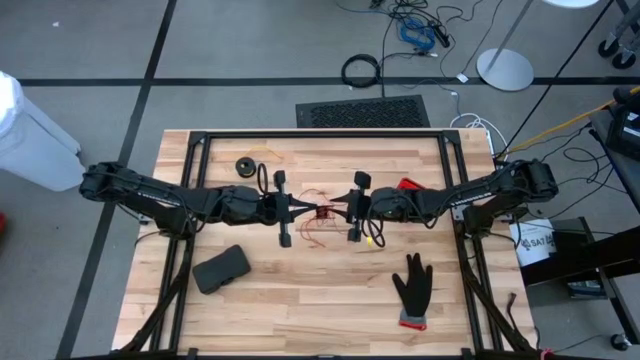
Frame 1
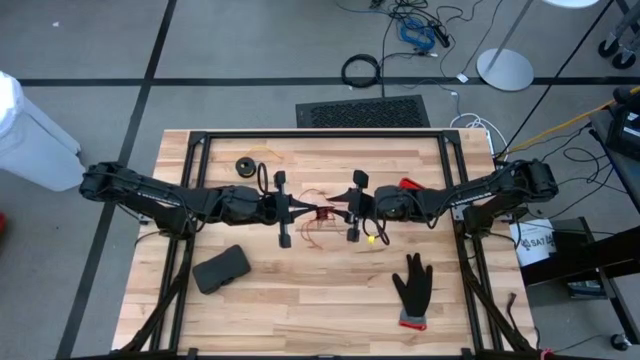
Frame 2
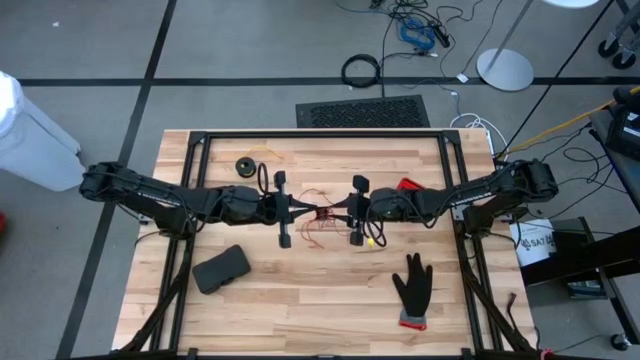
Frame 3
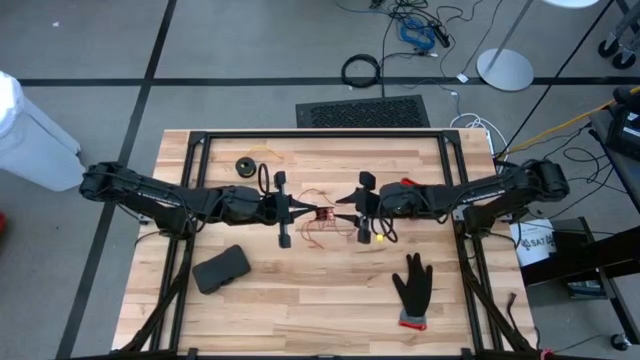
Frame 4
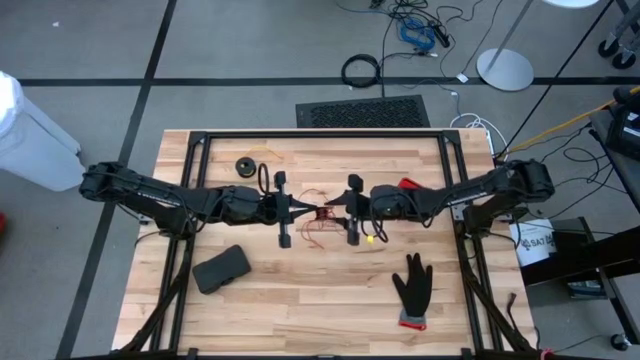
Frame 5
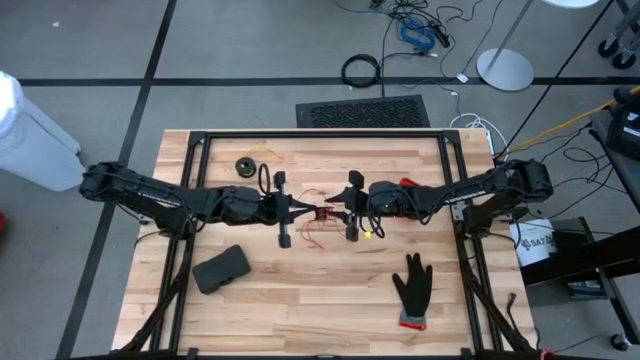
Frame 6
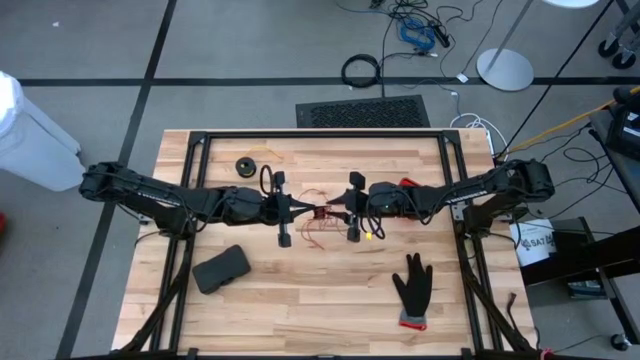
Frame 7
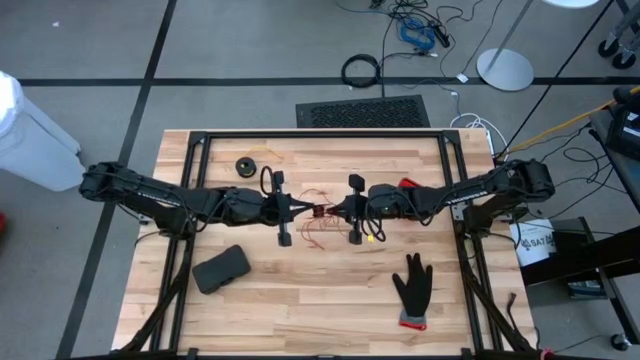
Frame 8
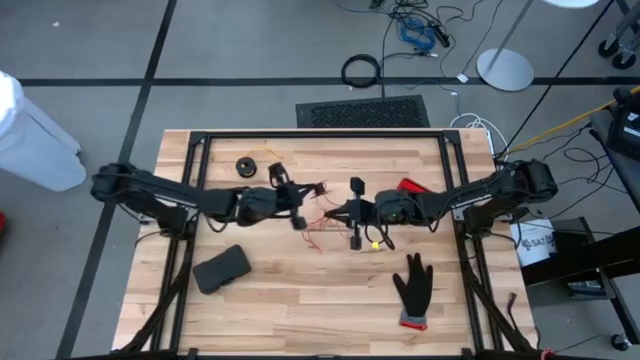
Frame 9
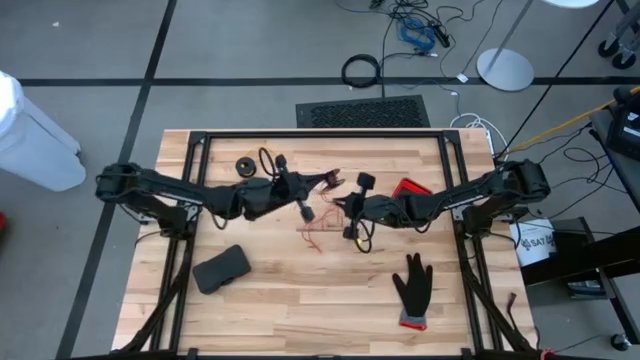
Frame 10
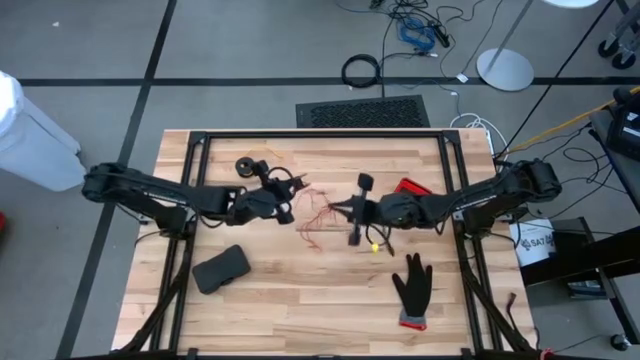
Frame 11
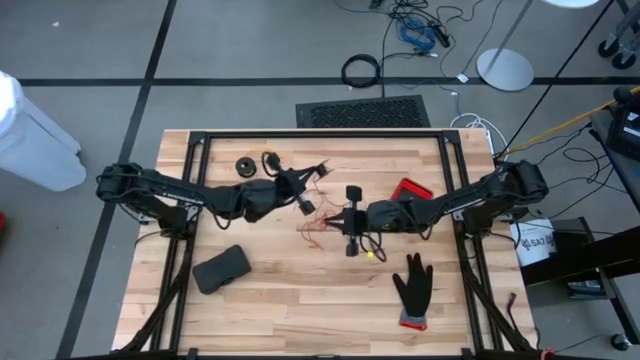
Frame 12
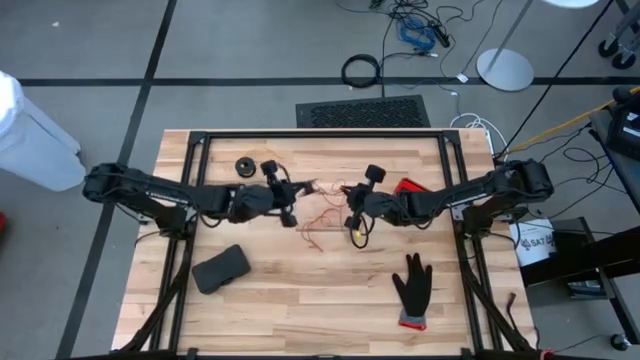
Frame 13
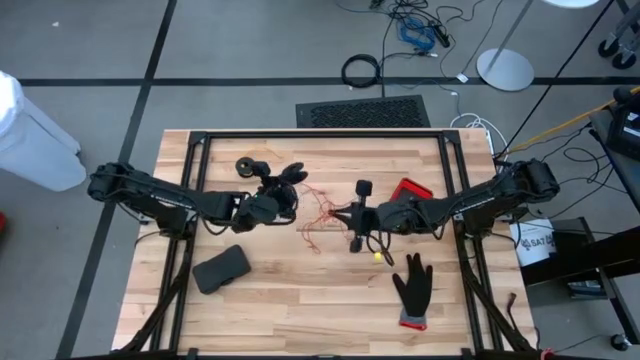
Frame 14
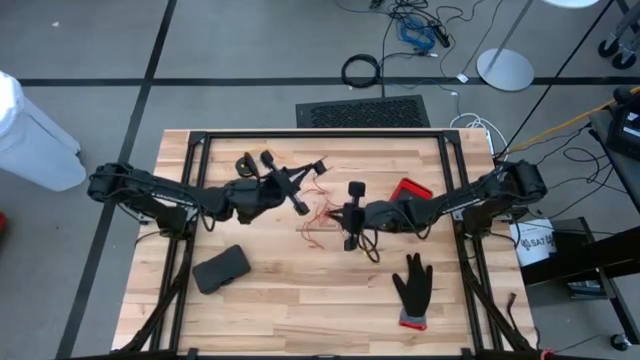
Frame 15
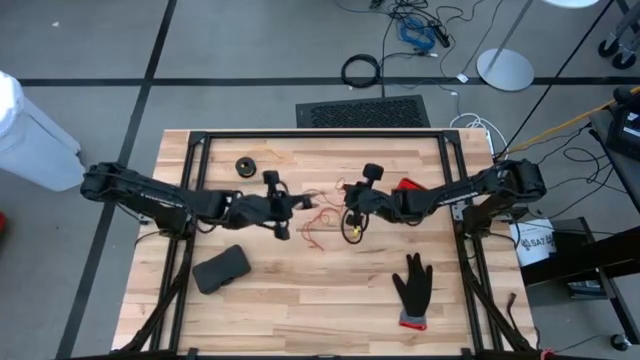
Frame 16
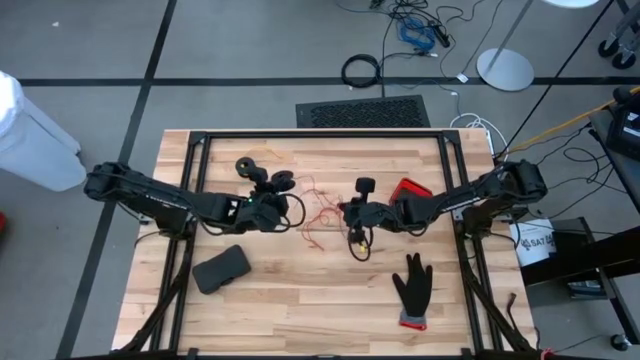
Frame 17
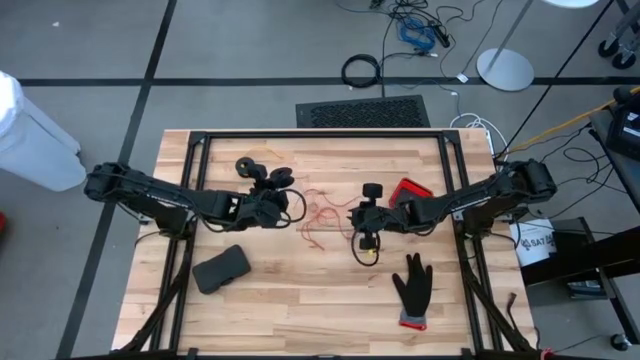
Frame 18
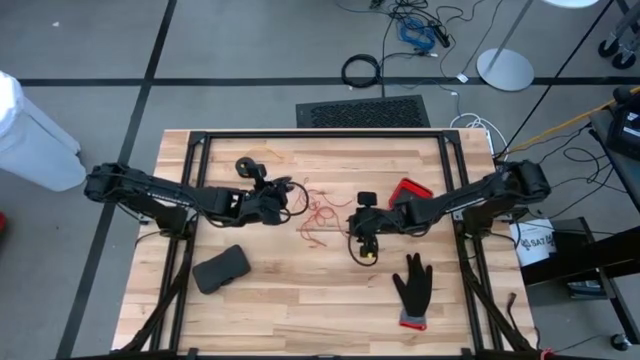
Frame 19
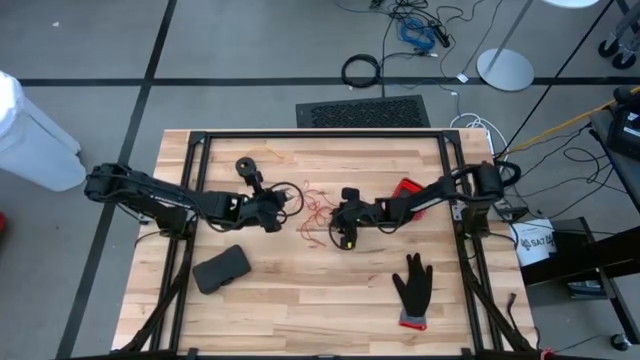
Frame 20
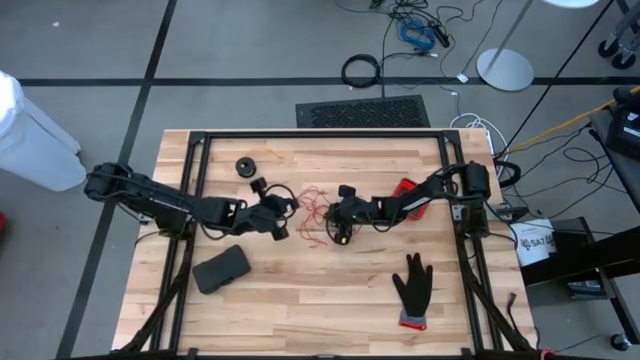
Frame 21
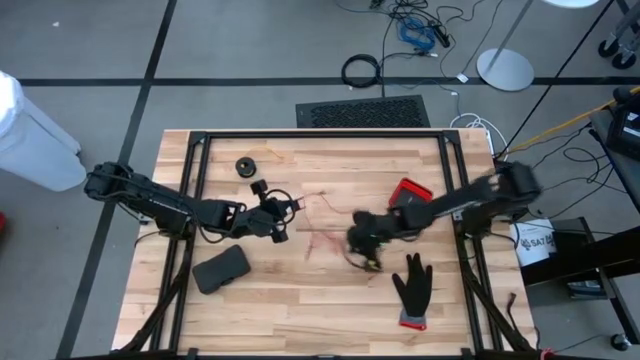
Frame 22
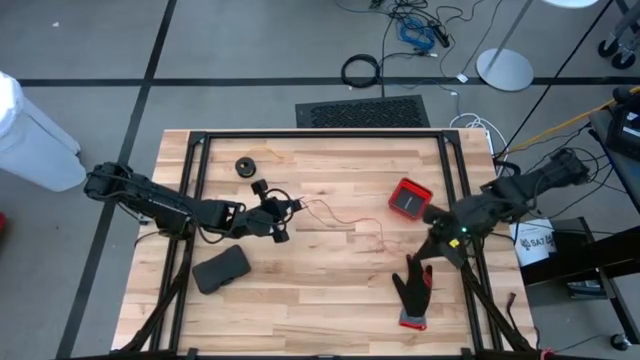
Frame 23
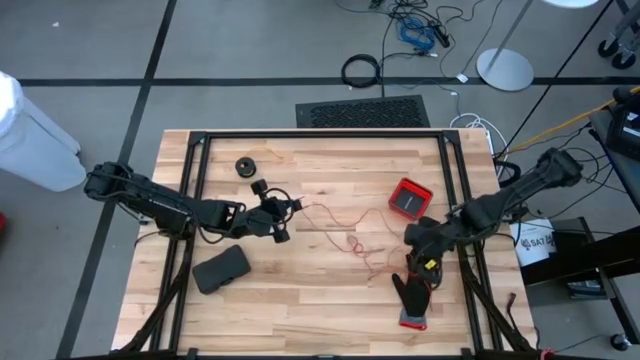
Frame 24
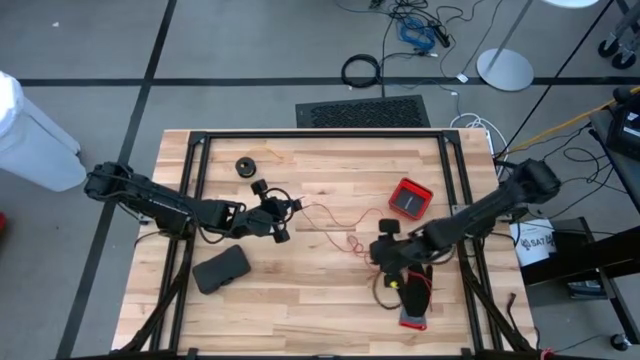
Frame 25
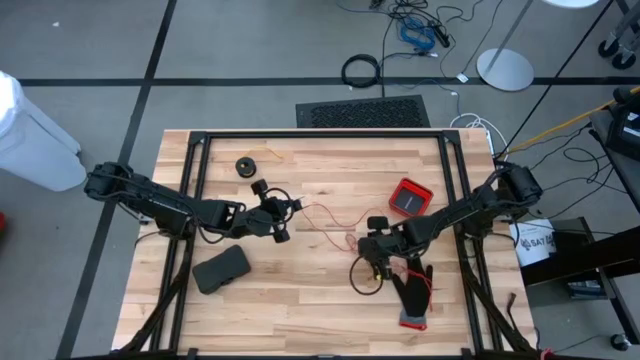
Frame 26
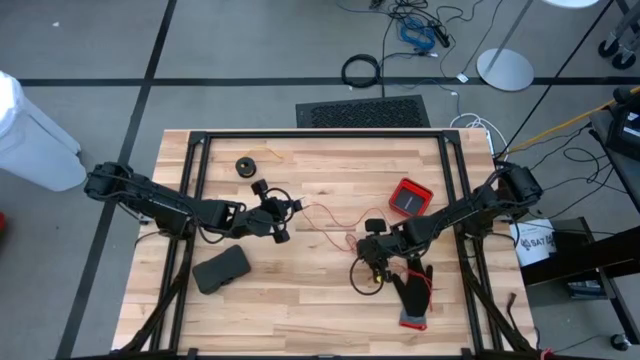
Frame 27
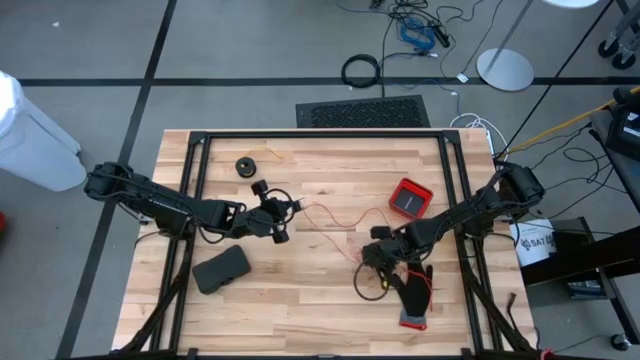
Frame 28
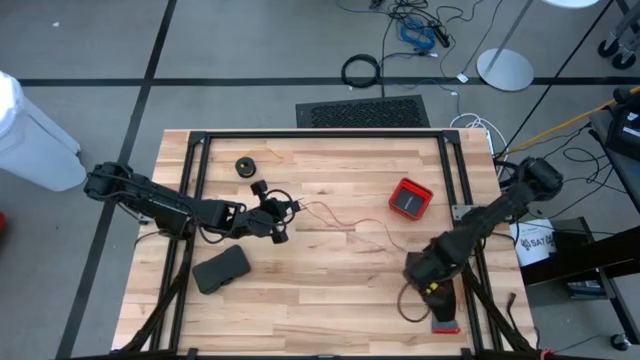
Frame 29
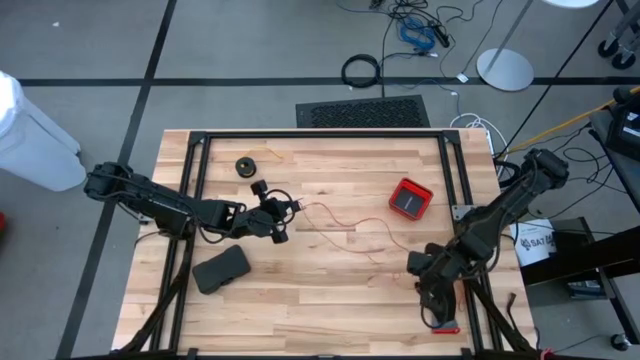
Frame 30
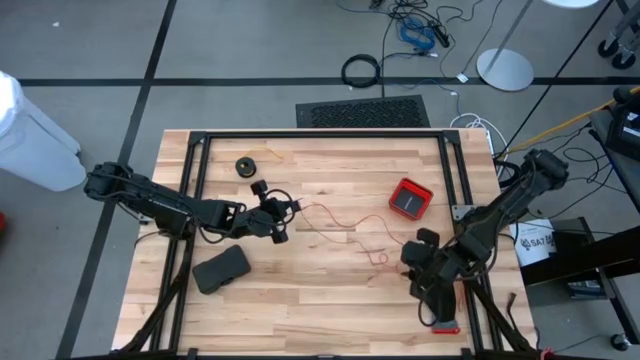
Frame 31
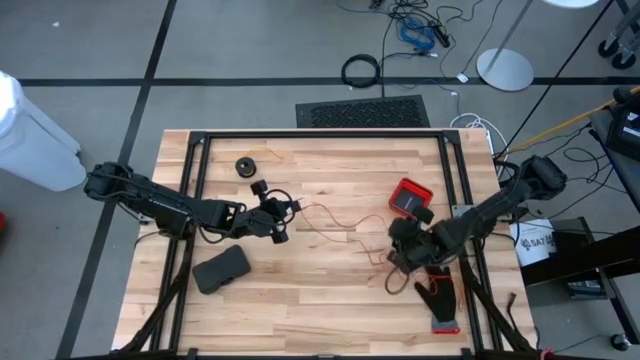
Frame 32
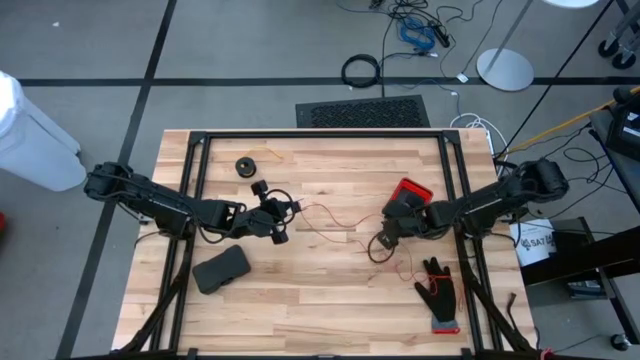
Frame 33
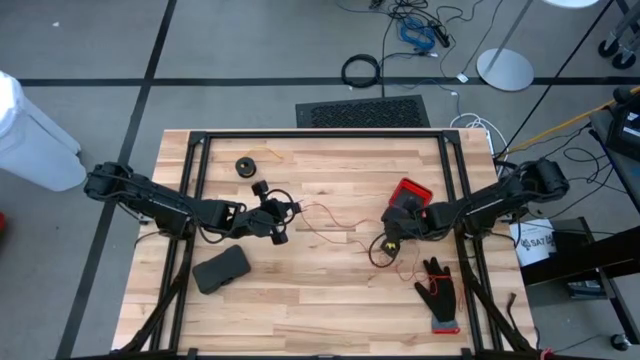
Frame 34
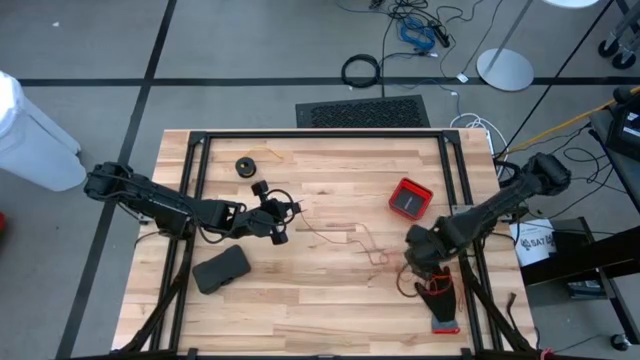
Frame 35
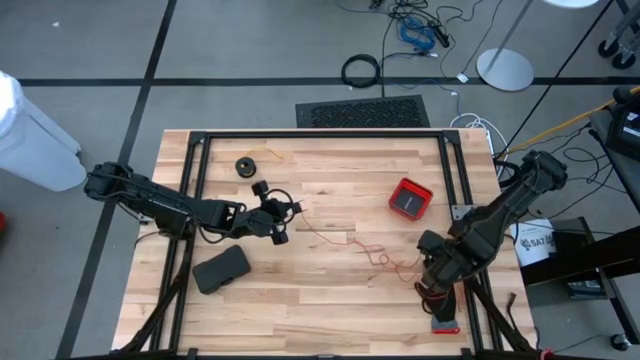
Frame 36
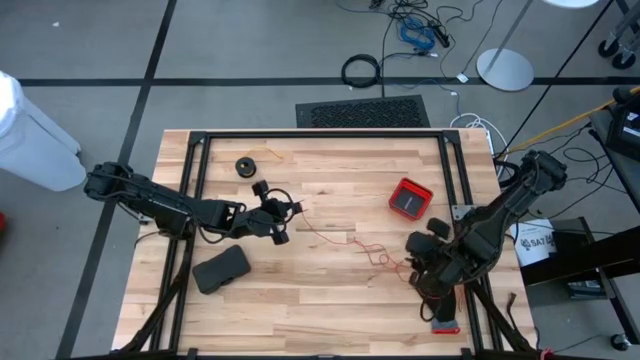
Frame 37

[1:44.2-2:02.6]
Task: Coil cords
Uncoil the red wire from the black spool

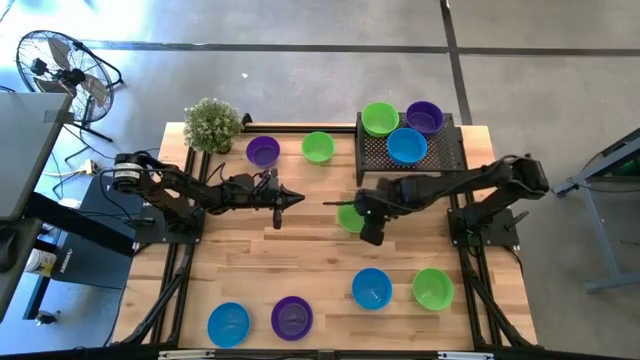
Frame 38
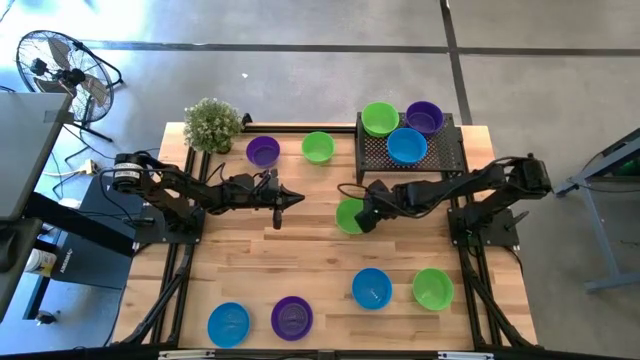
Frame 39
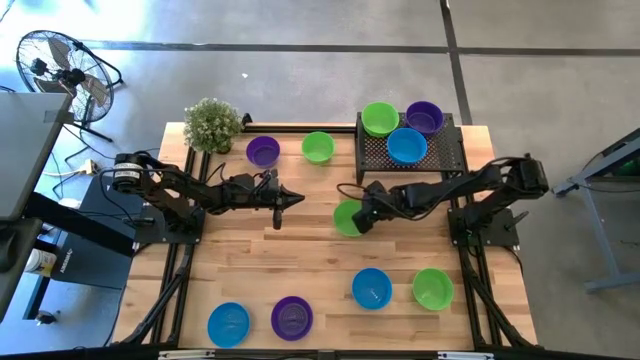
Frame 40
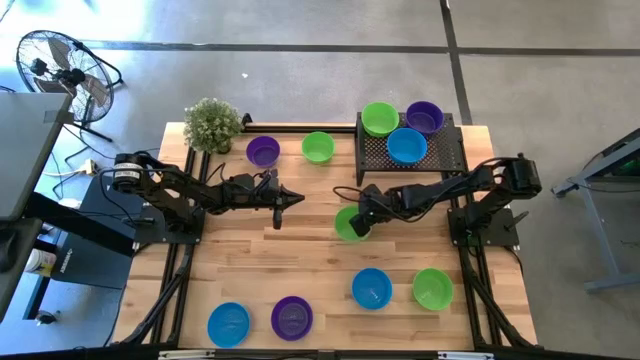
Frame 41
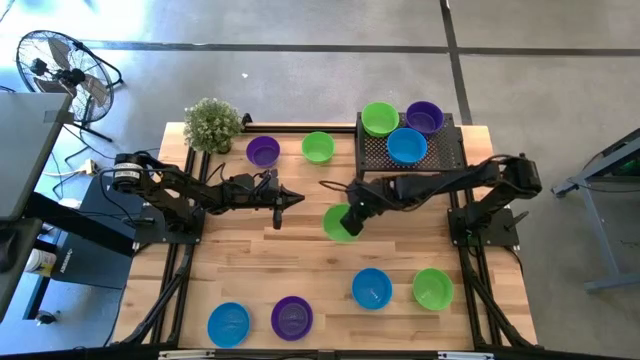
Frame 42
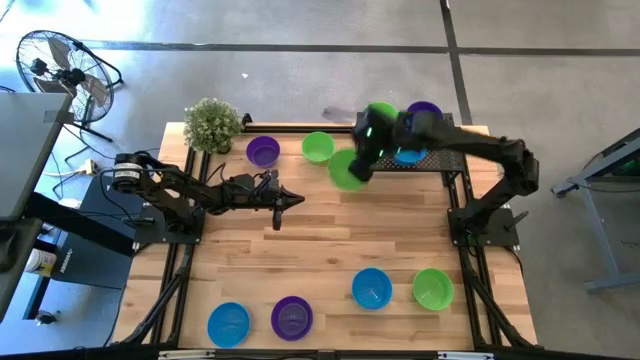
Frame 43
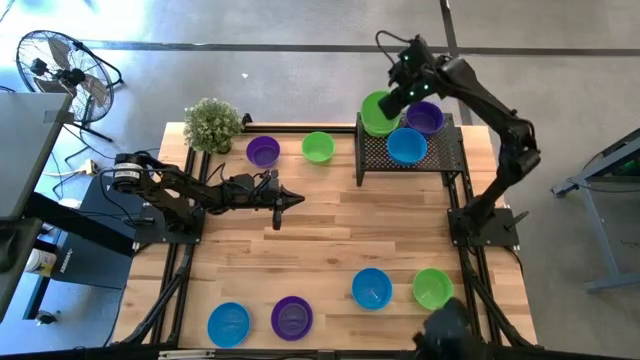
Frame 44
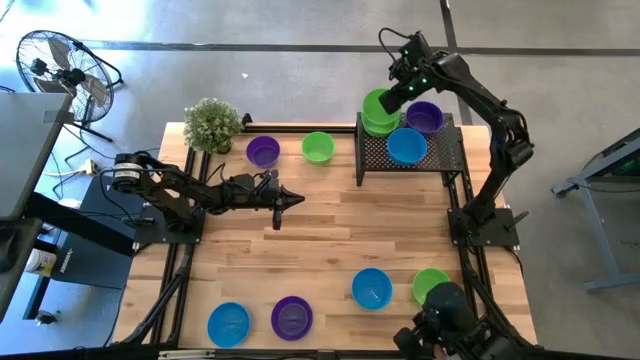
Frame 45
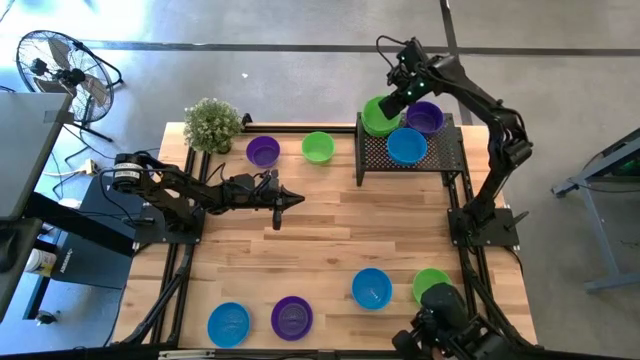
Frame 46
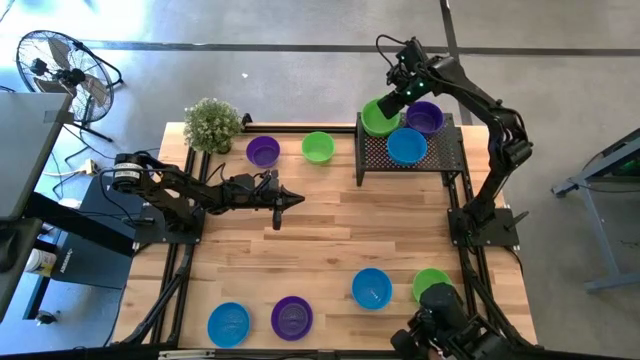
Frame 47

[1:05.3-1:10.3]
Task: Pick & Place Mini bowls
Stack the green bowl on the other green bowl on the shelf
